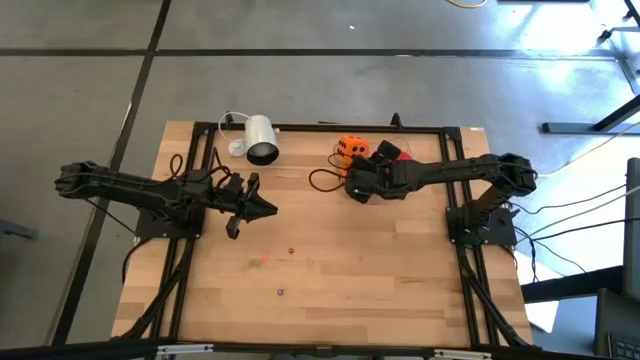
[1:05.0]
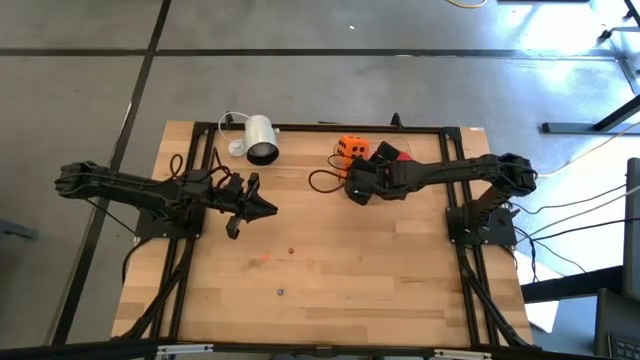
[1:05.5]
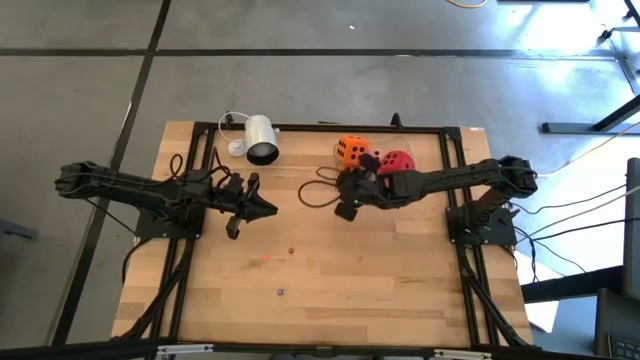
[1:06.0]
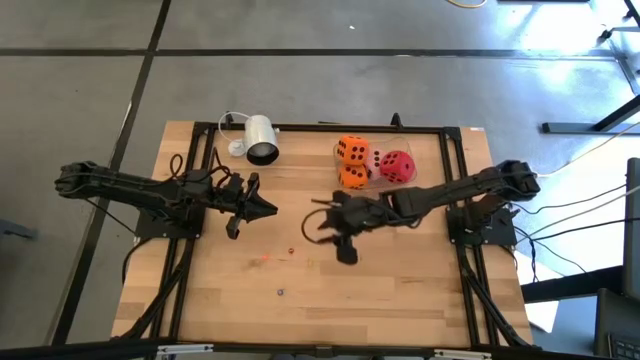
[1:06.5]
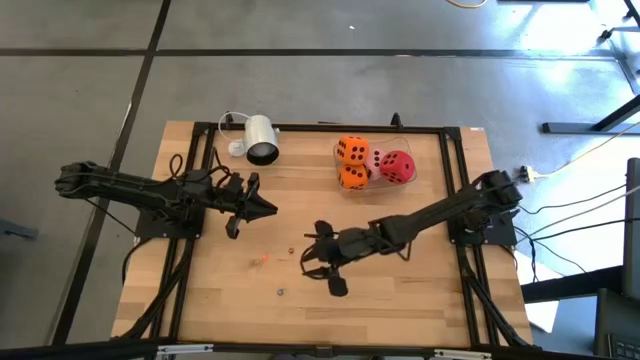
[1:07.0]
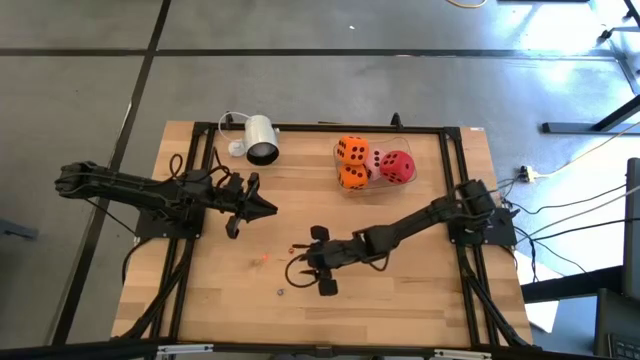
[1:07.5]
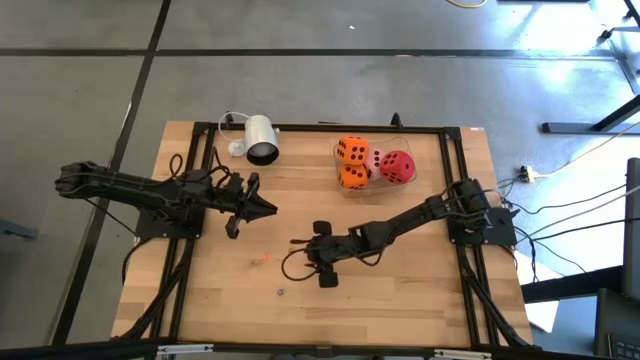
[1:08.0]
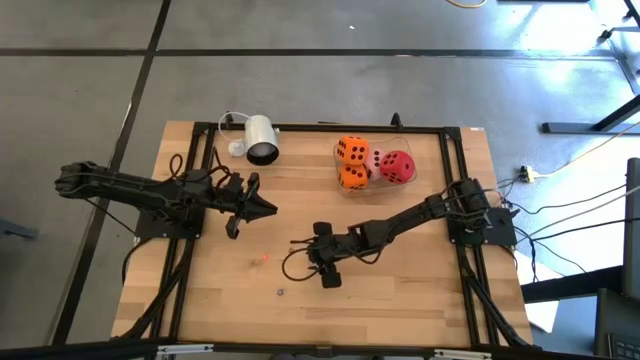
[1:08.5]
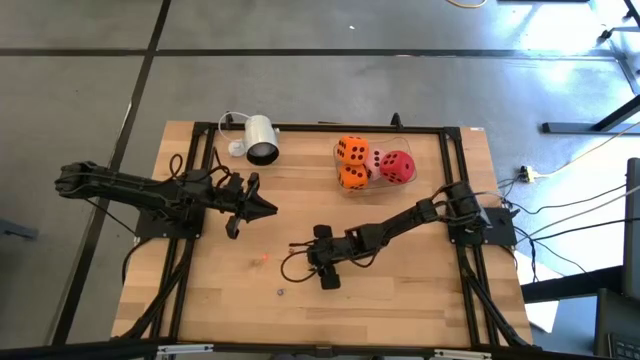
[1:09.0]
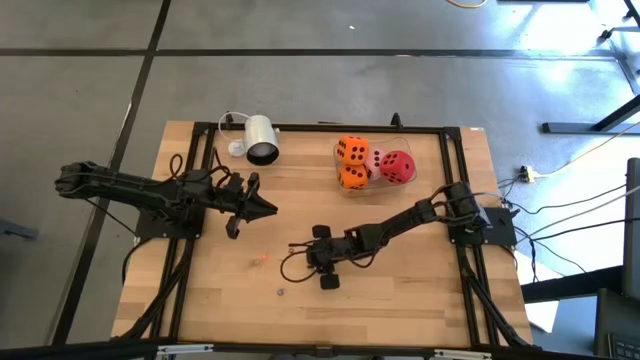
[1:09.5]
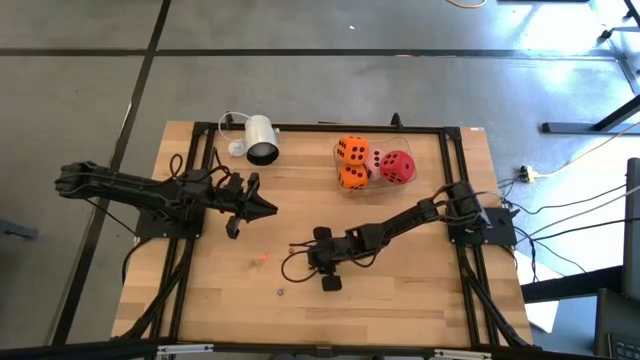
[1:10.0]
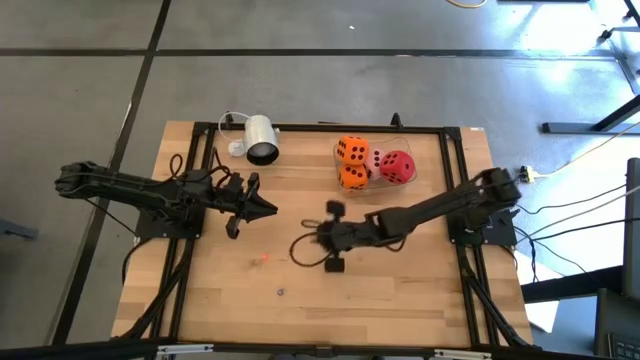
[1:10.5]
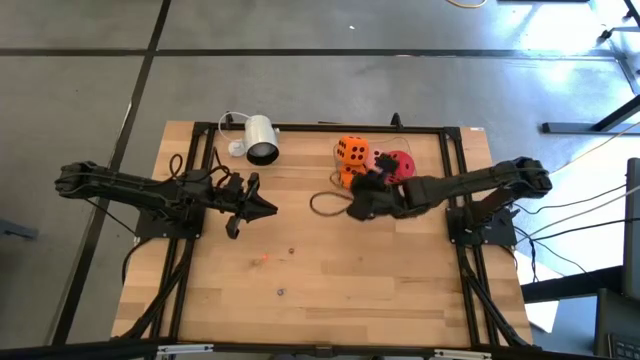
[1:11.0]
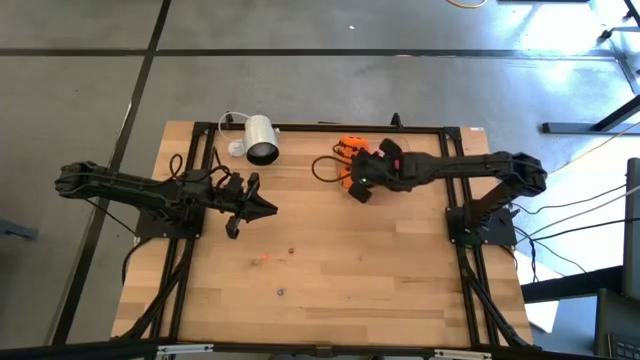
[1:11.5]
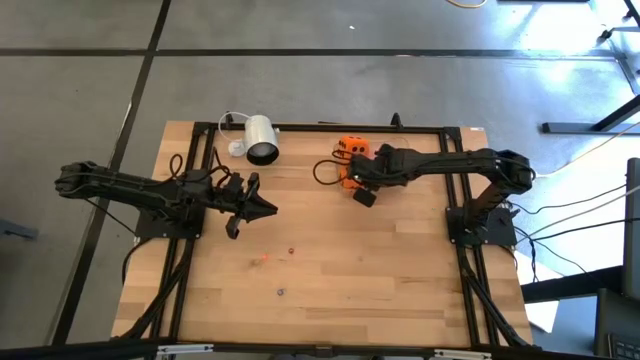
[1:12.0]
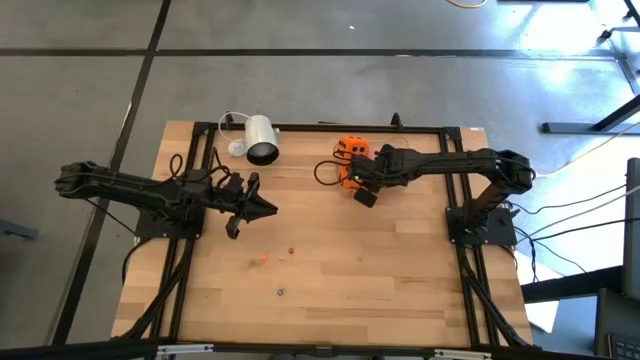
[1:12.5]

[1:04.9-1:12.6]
Task: Pick & Place Dice
Put the small yellow die into the transparent bin

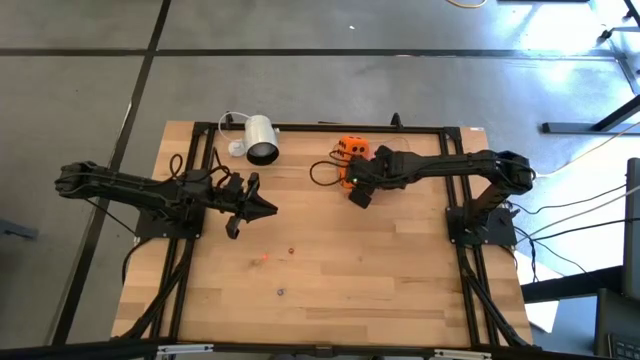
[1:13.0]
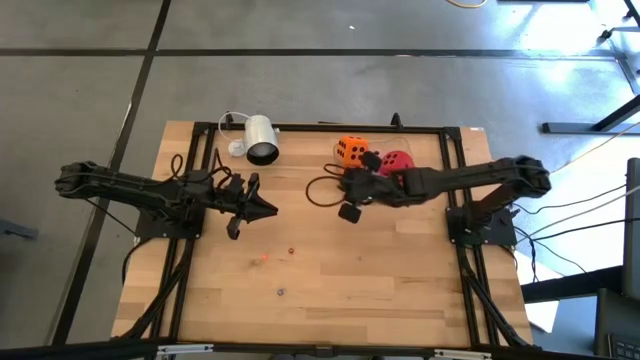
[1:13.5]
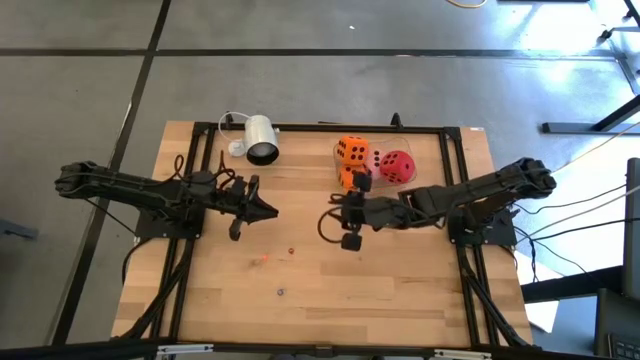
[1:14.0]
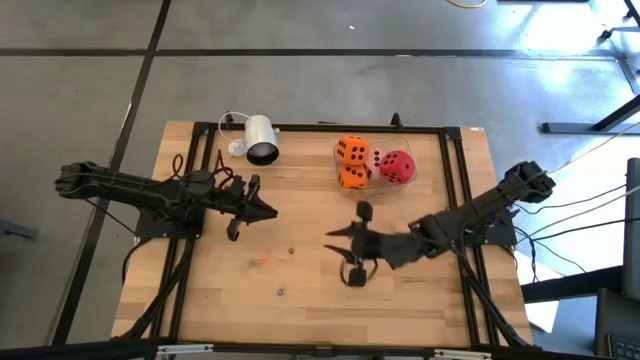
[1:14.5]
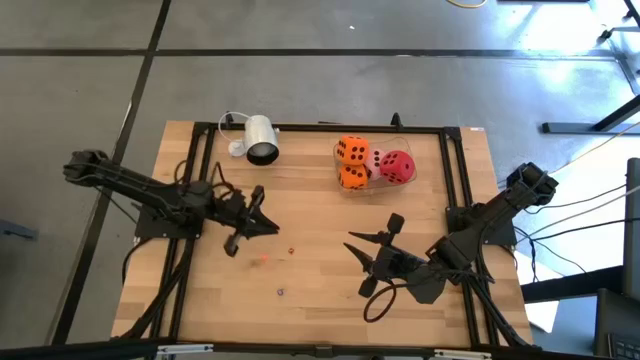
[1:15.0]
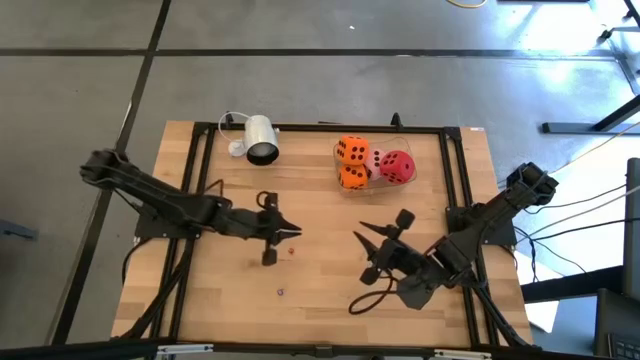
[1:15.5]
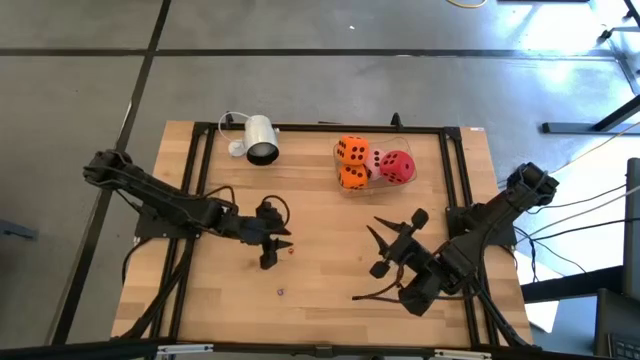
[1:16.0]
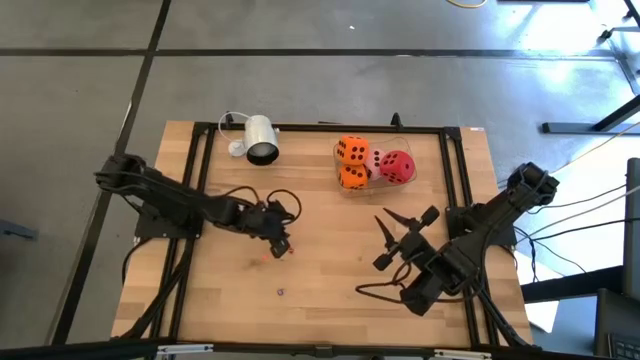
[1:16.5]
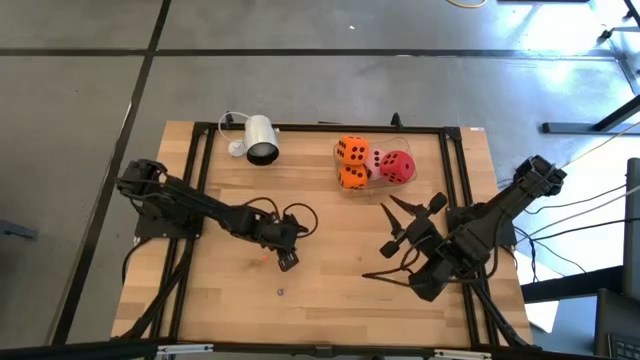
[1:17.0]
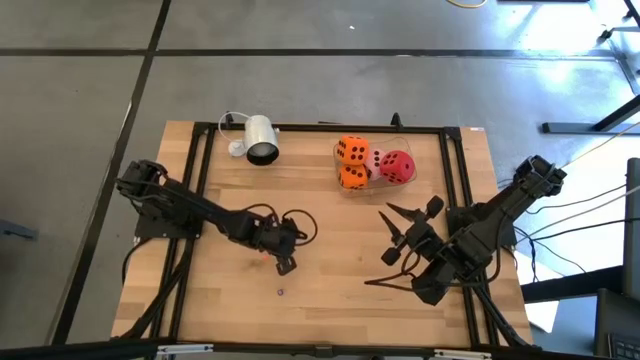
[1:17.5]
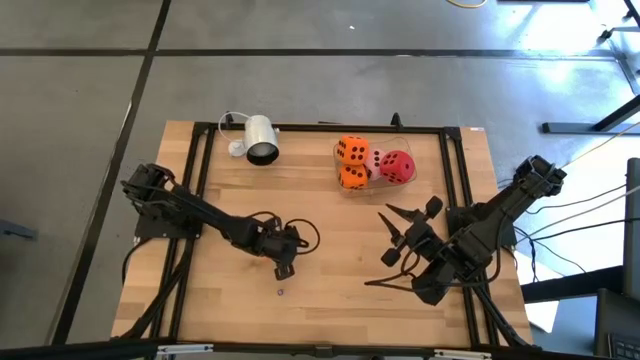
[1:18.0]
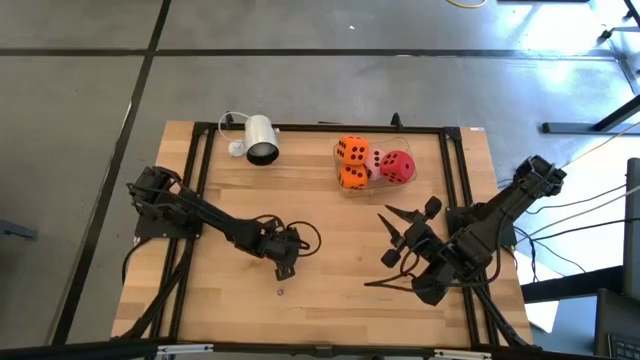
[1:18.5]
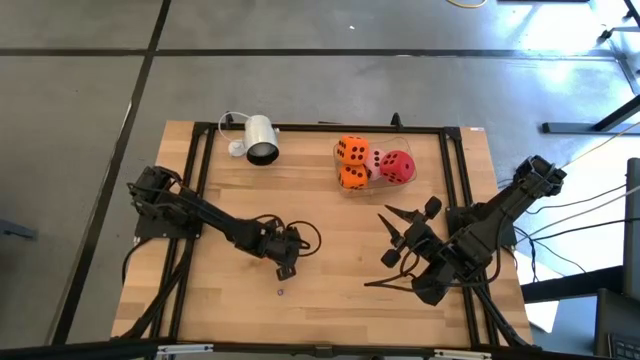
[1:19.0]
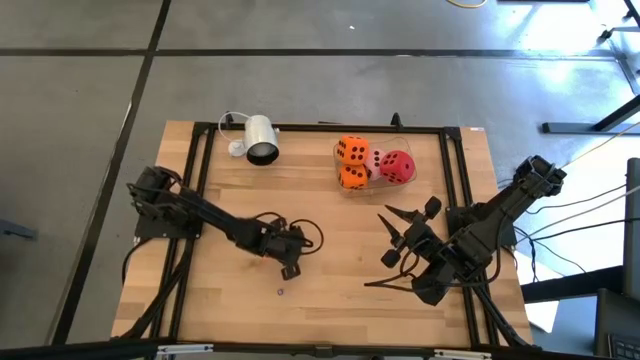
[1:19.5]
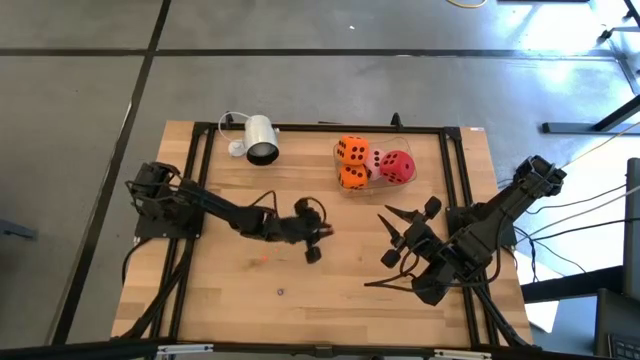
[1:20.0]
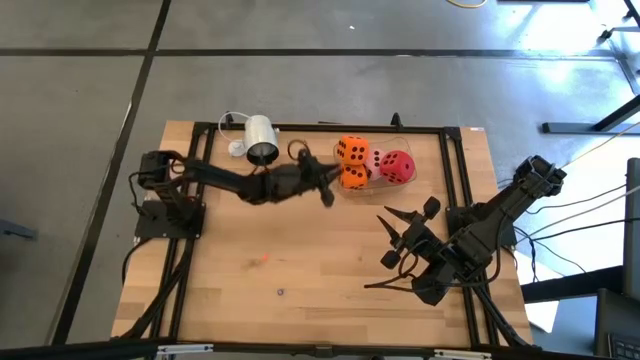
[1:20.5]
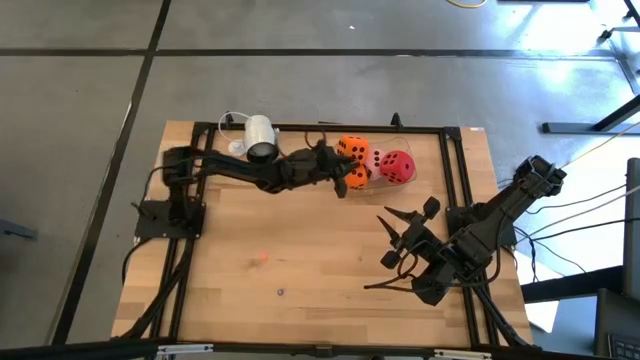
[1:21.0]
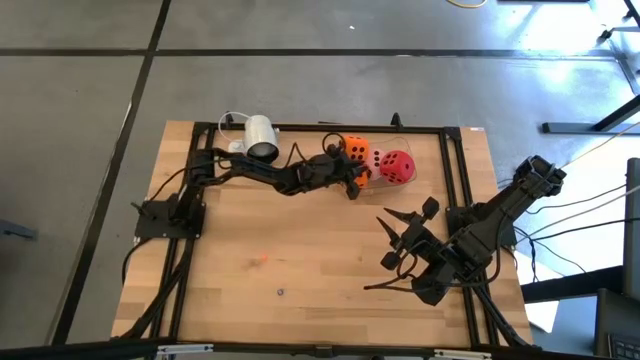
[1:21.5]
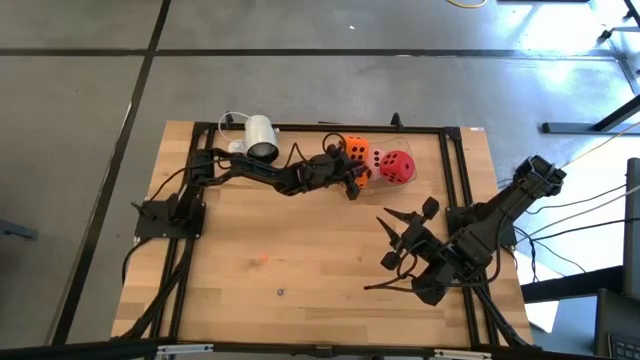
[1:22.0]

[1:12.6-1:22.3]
Put the small red die into the transparent bin

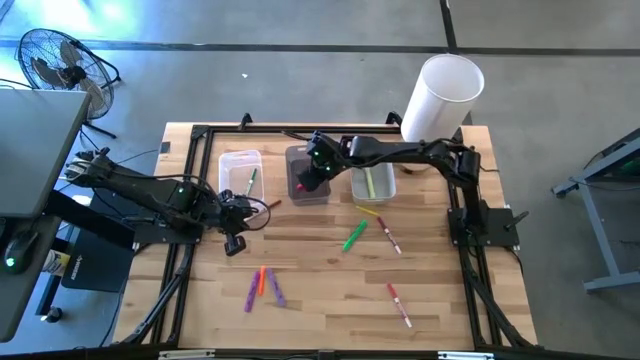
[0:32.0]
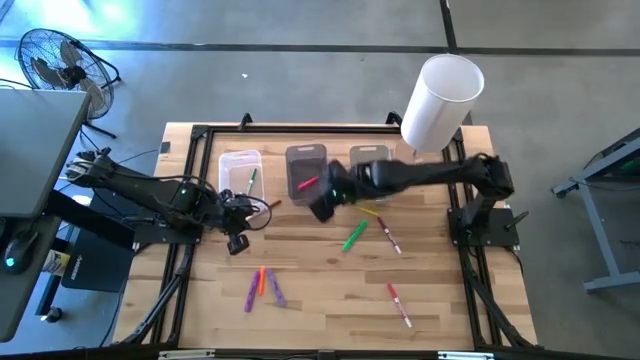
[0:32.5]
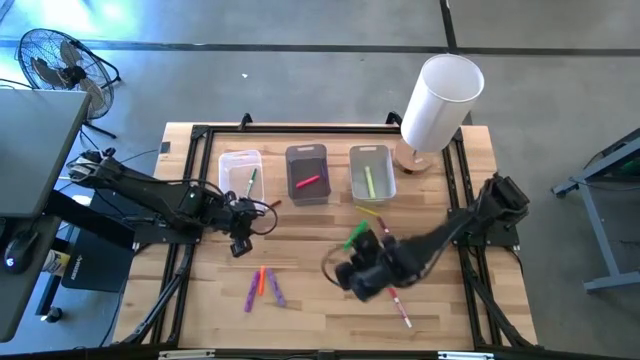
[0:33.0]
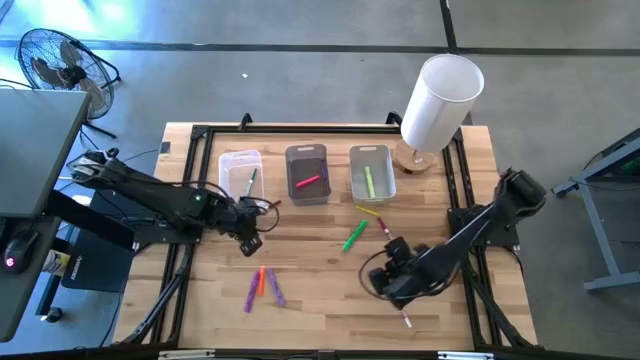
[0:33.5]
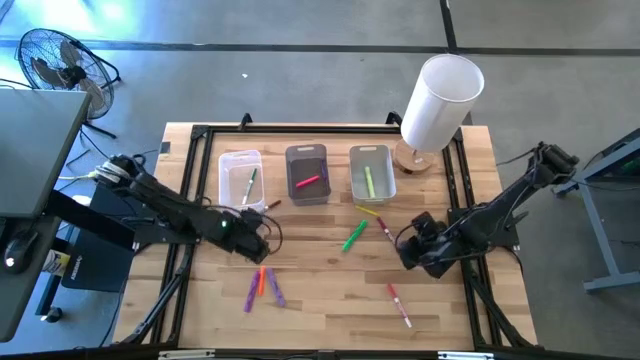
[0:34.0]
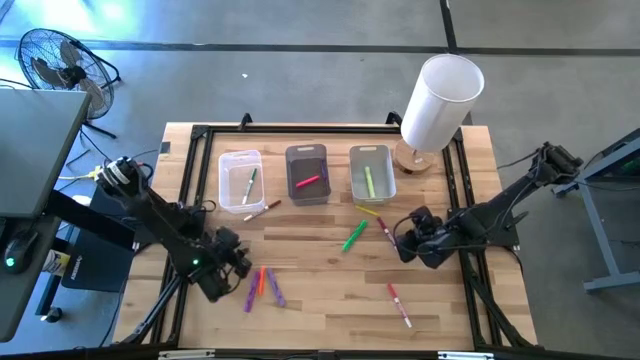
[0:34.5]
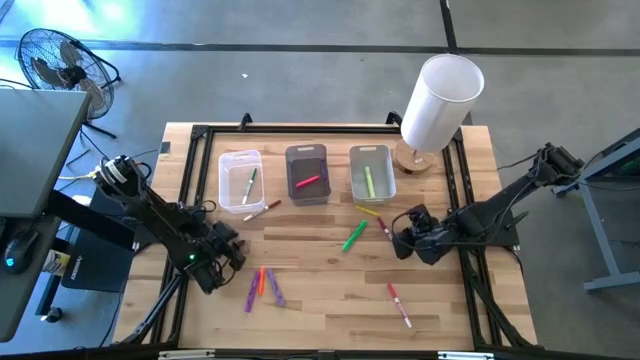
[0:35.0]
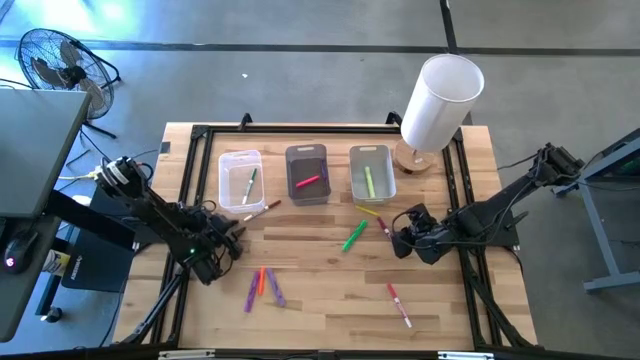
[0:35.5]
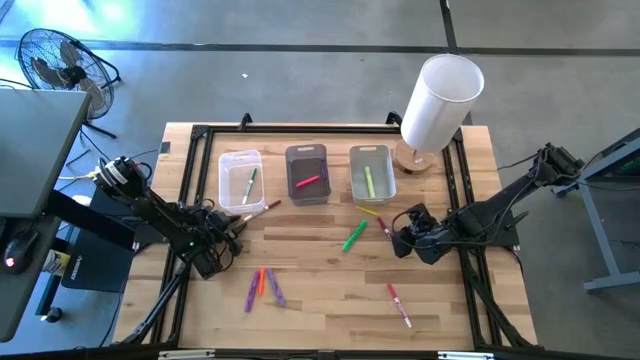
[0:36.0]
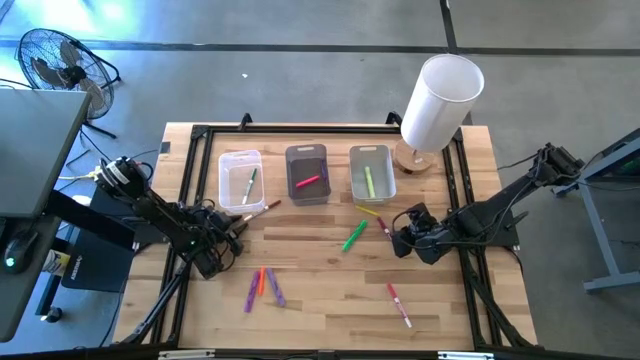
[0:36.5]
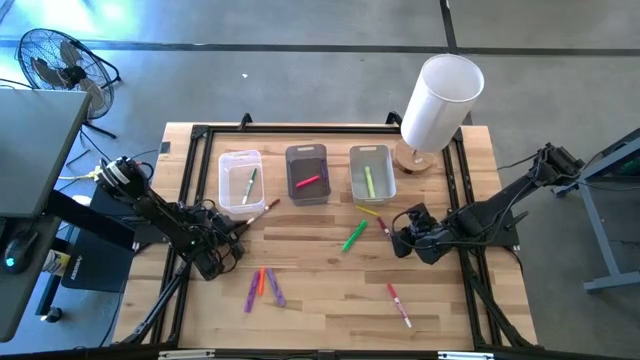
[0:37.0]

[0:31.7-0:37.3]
Task: Pick & Place Markers
Put the brown marker pen into the transparent bin
